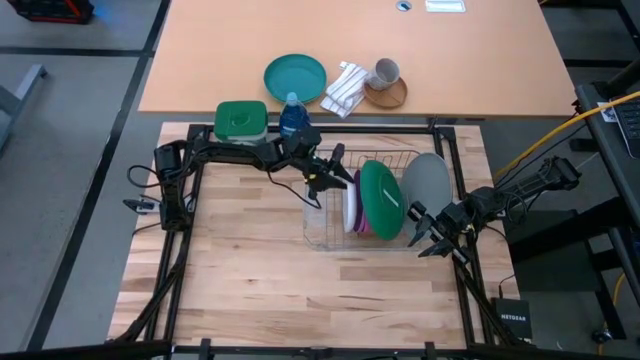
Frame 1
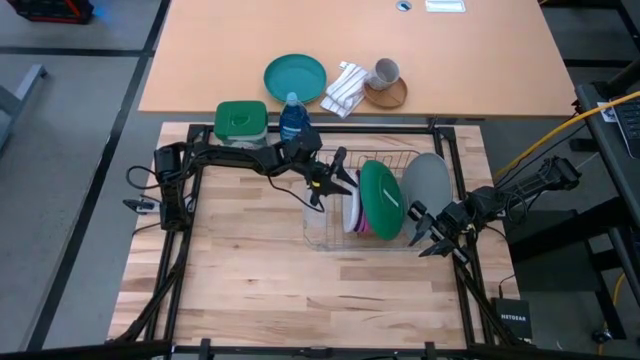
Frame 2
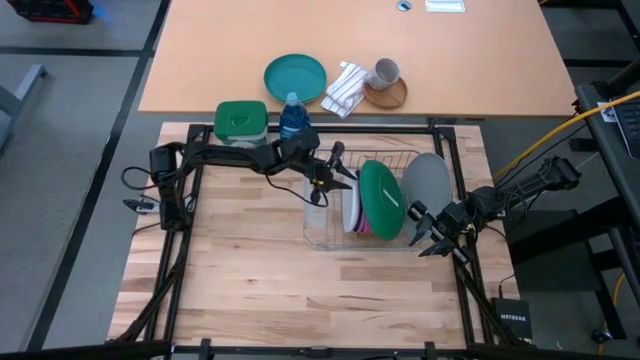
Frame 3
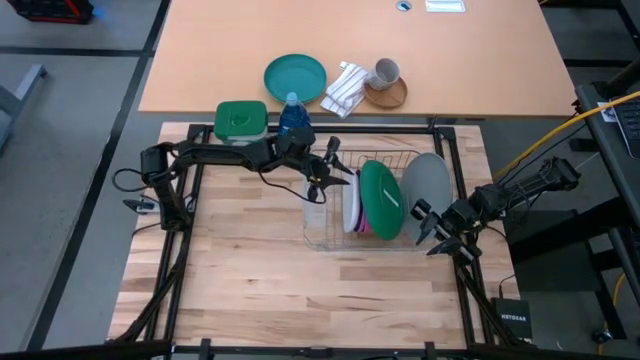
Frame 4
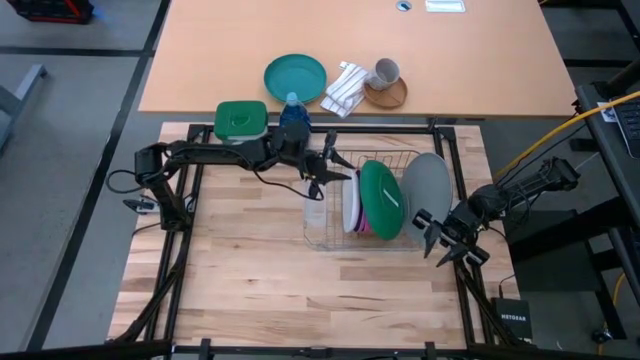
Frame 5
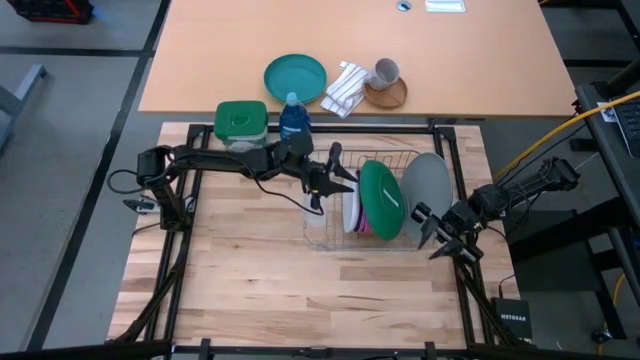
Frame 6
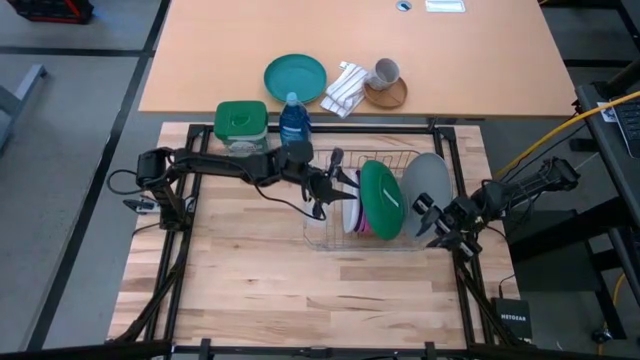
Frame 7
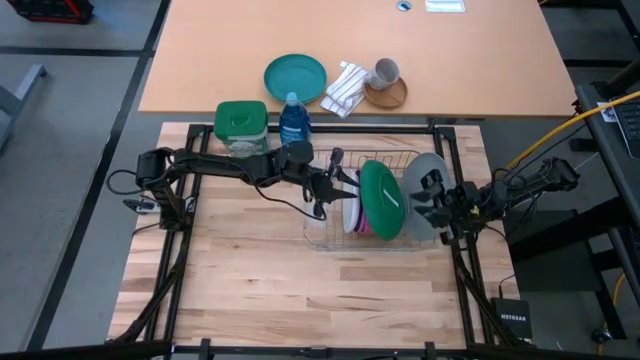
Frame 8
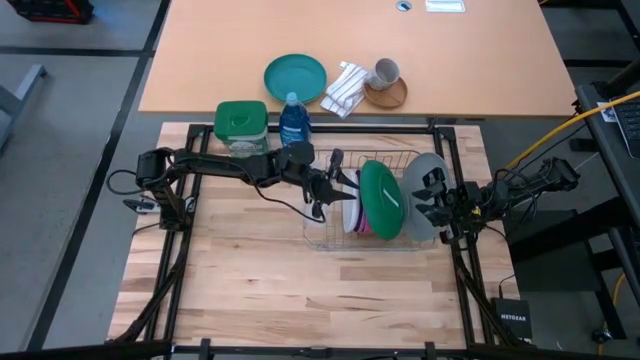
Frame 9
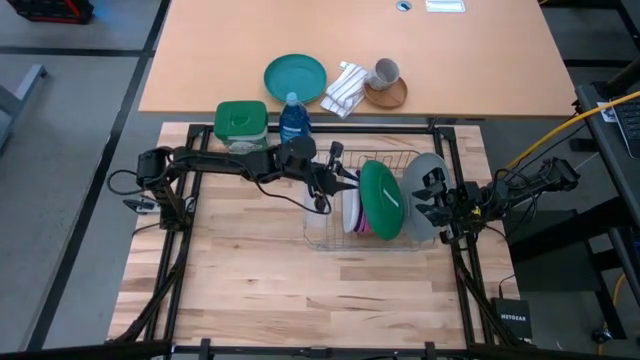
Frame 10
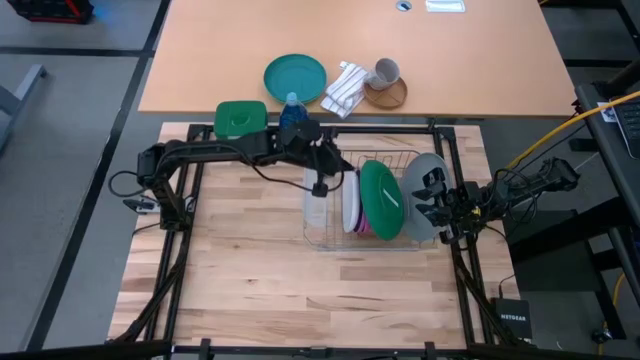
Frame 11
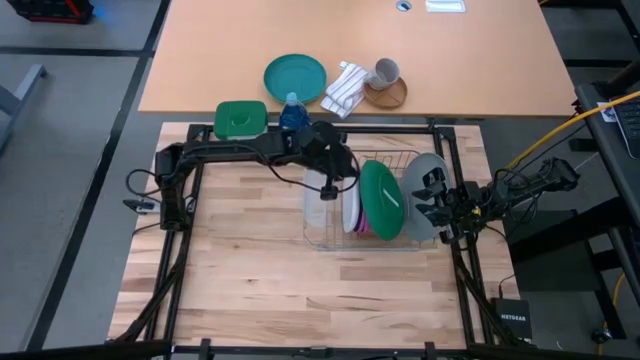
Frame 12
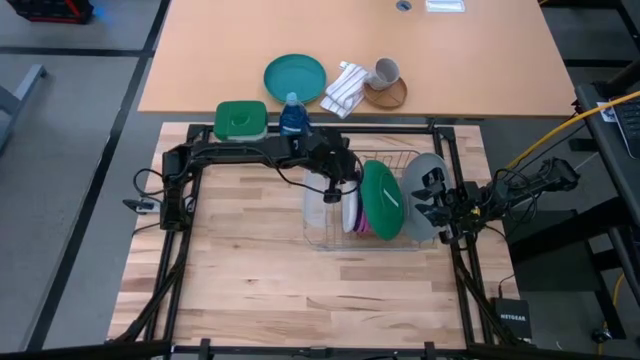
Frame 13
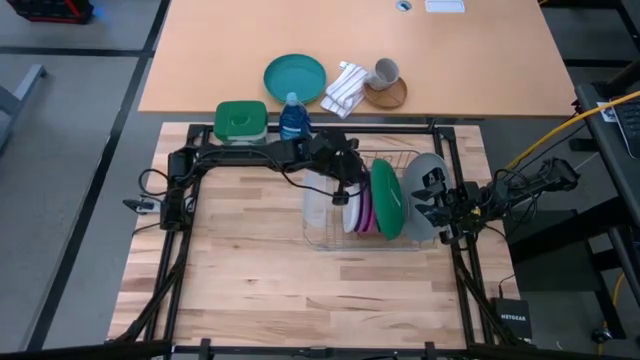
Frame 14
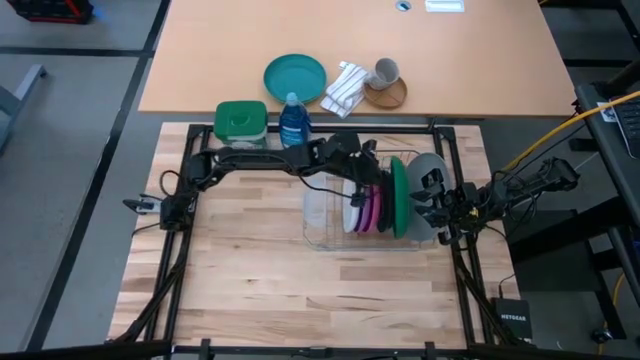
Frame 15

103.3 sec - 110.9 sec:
Task: Sort dishes
Adjust the green plate on the dish rack

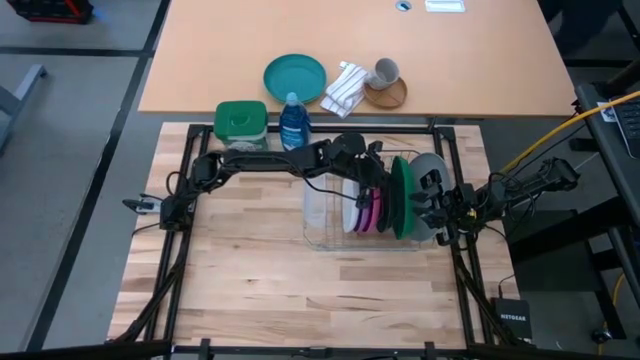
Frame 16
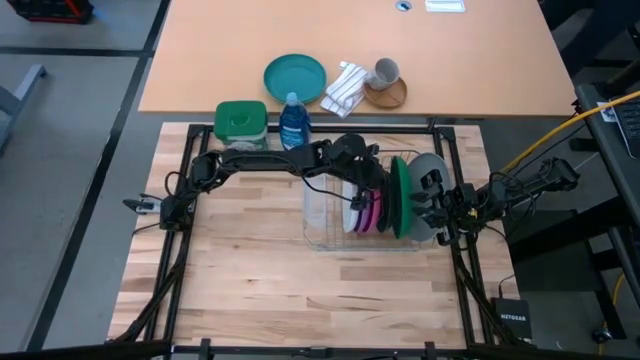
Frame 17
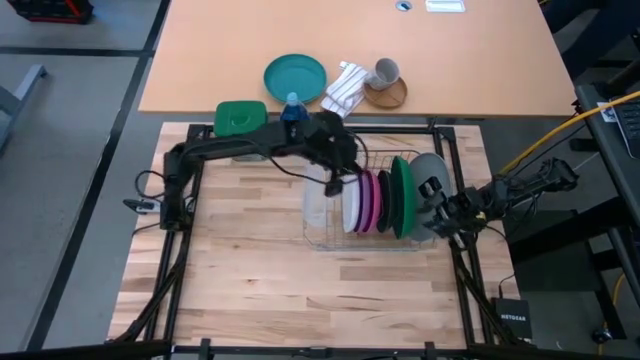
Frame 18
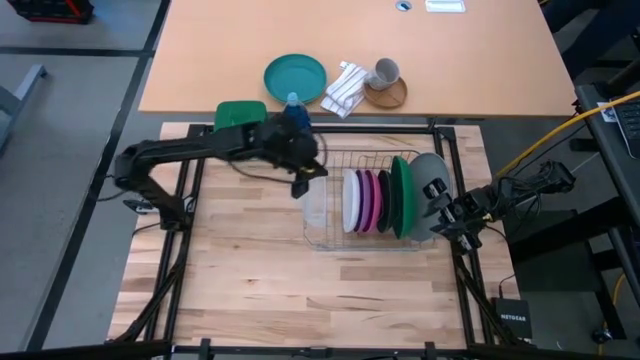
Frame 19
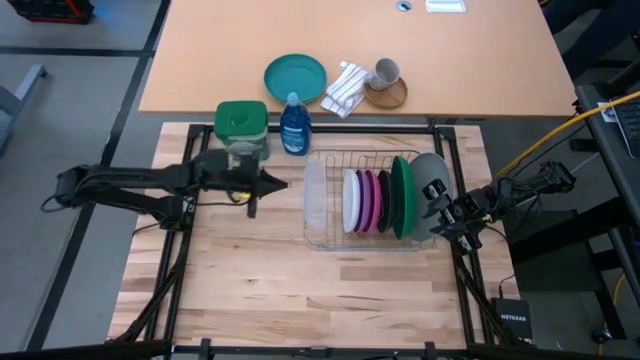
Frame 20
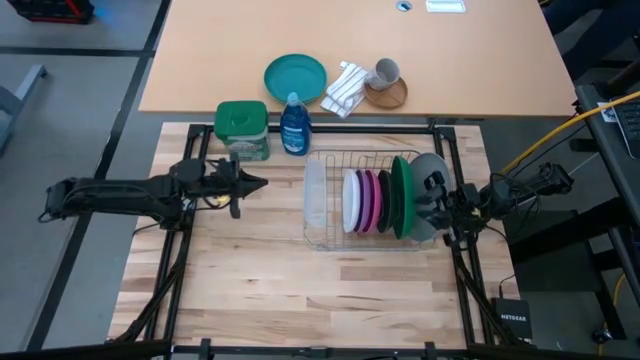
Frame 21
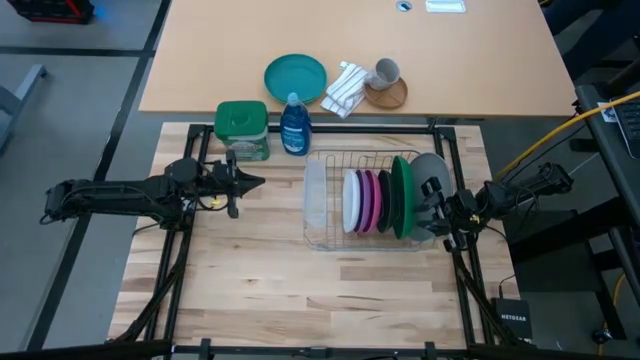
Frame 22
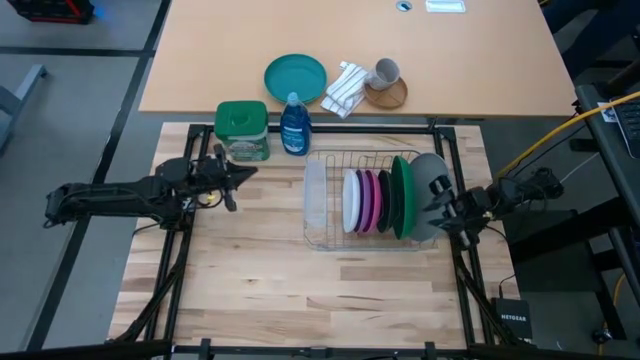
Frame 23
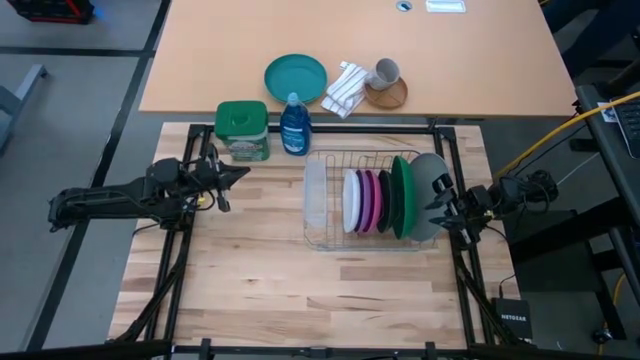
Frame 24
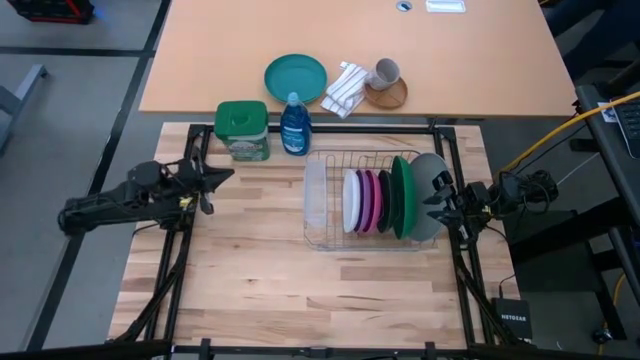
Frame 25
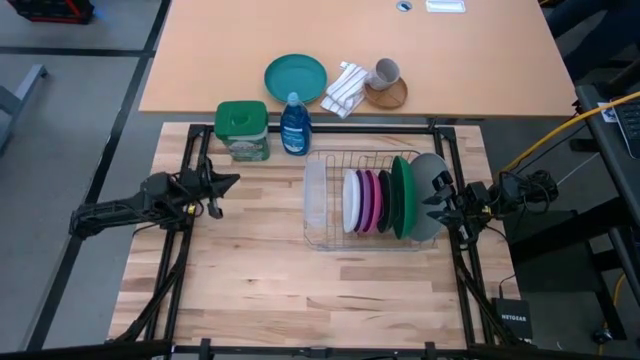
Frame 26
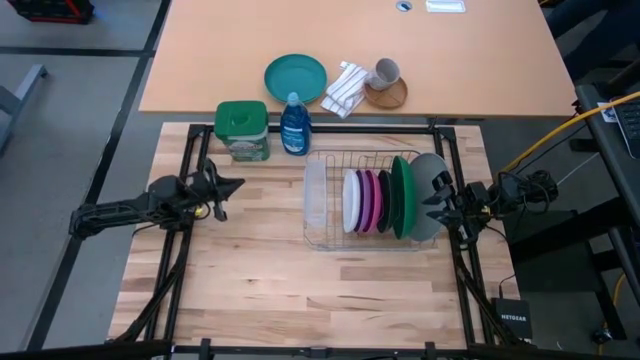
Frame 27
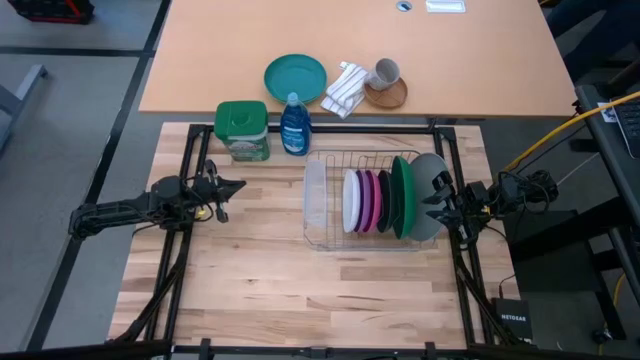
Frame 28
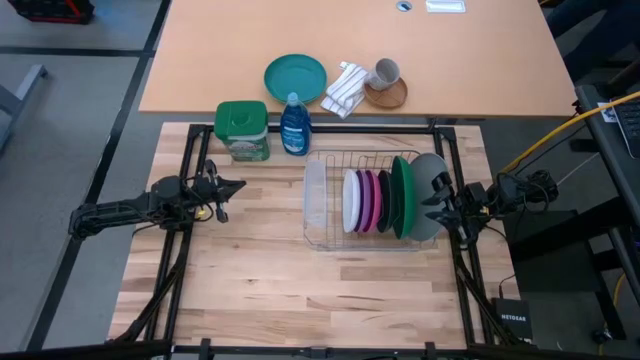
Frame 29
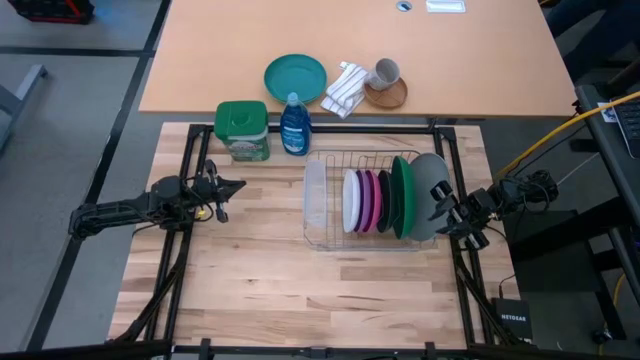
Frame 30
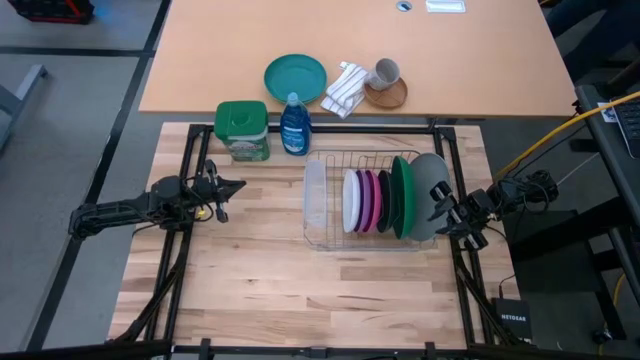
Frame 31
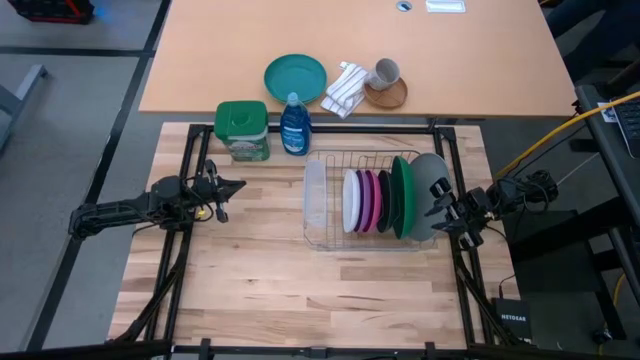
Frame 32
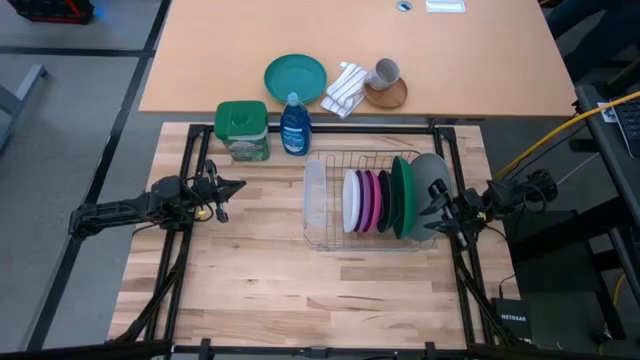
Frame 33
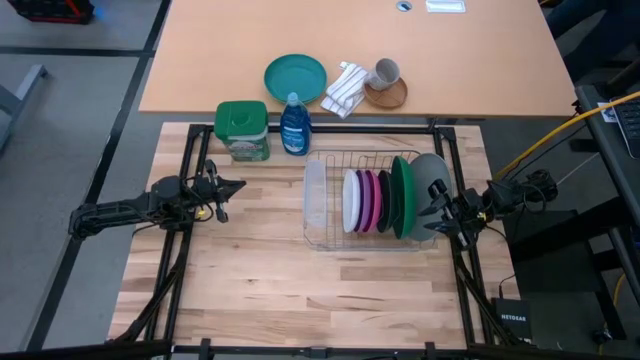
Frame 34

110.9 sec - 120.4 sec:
Return to Home Position

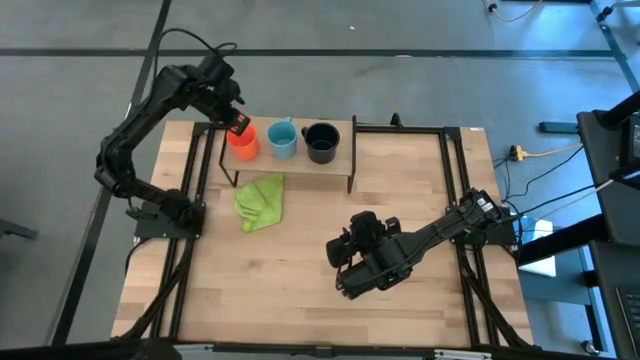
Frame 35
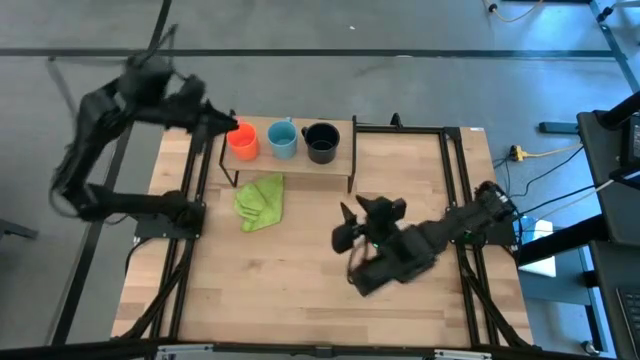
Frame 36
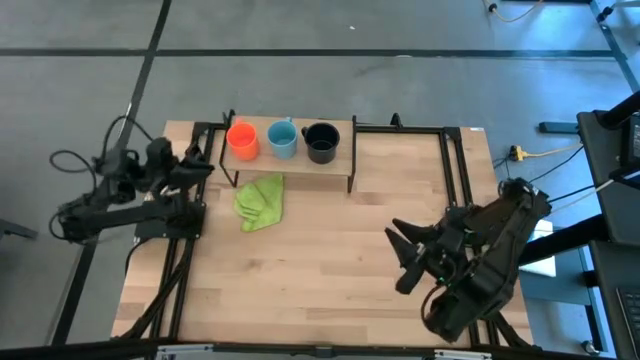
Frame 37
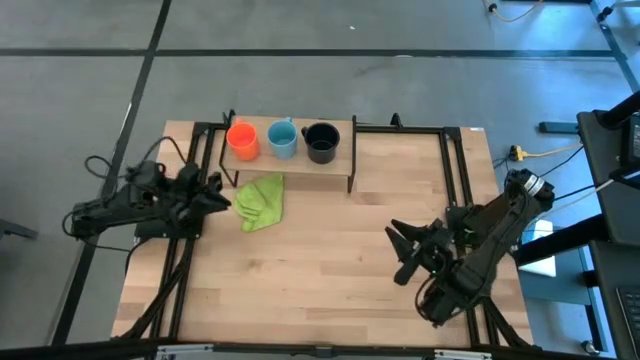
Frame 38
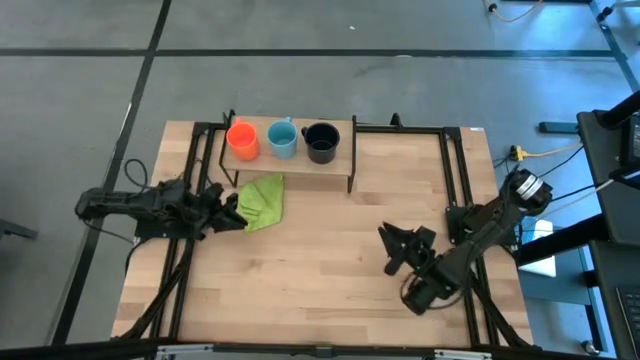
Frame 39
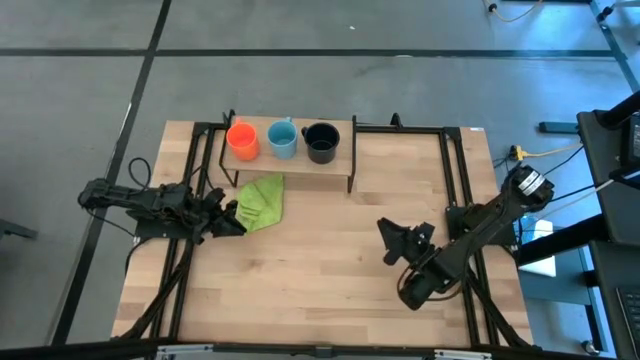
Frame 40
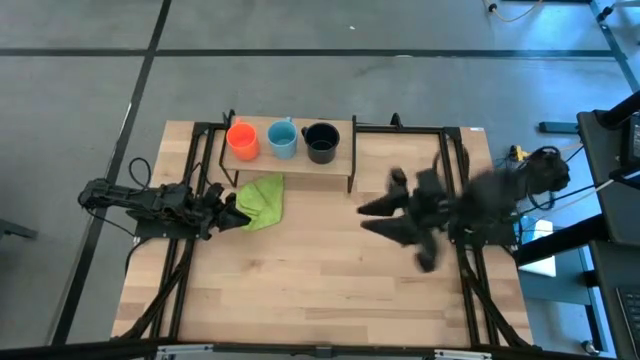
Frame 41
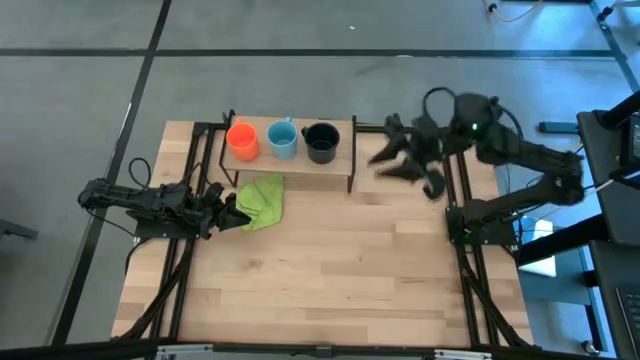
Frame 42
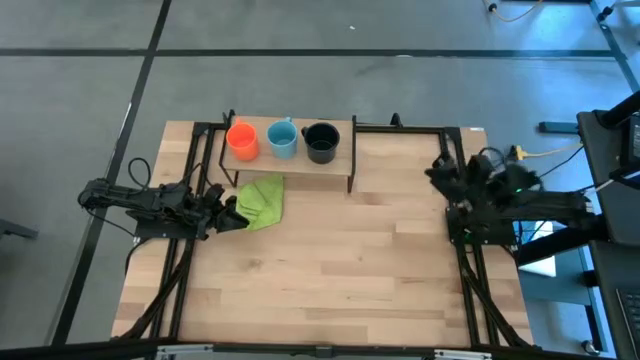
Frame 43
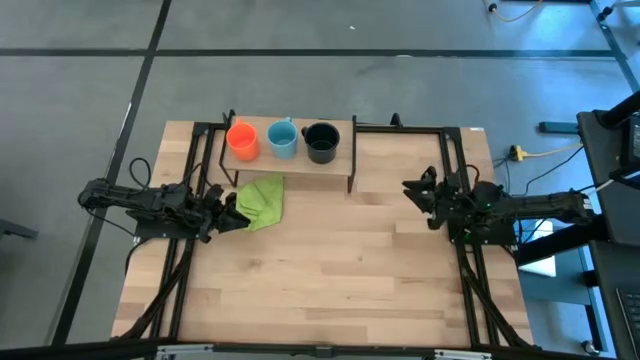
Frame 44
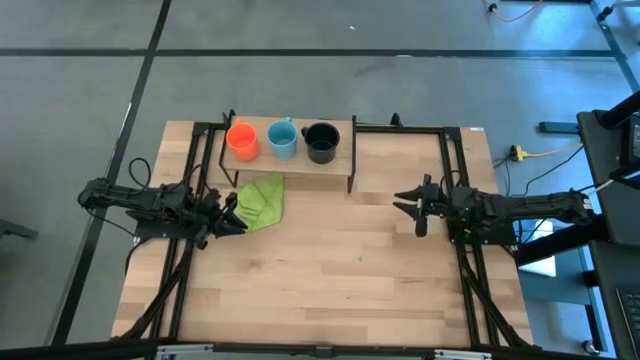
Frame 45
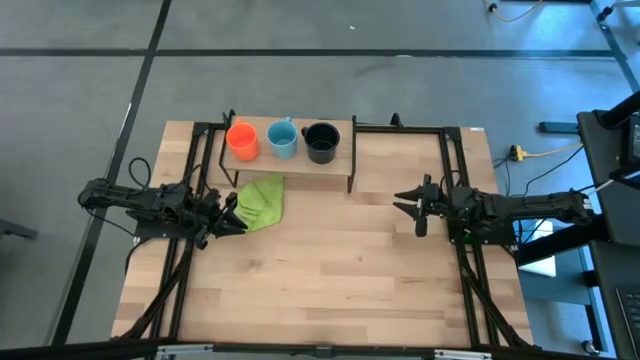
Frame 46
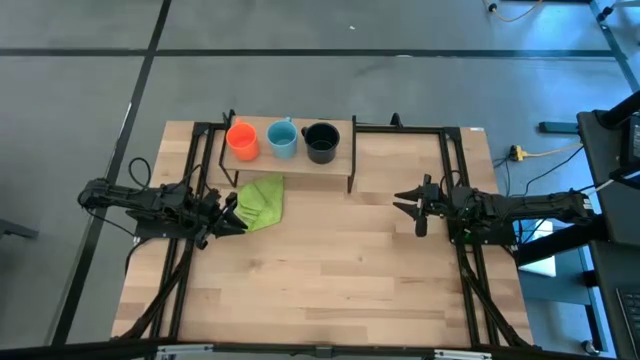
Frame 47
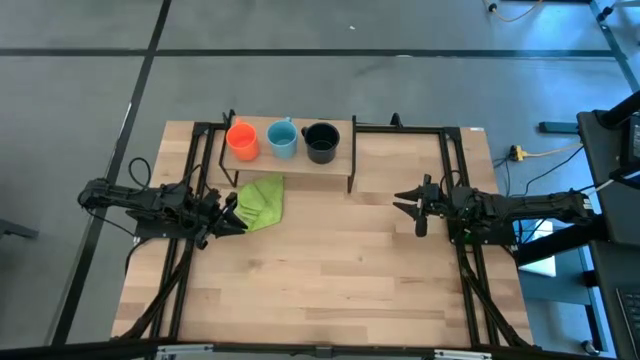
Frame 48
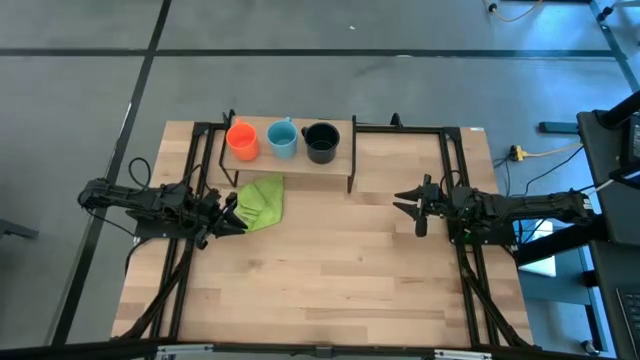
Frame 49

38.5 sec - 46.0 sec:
Task: Stack small to large cups/mugs on shelf
Return to Home Position
